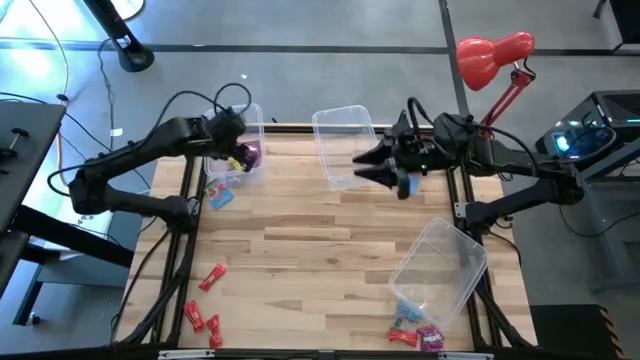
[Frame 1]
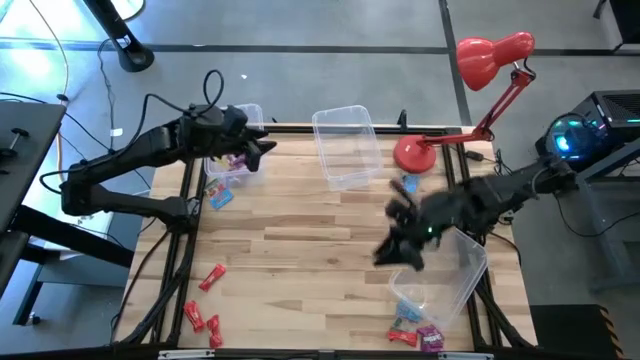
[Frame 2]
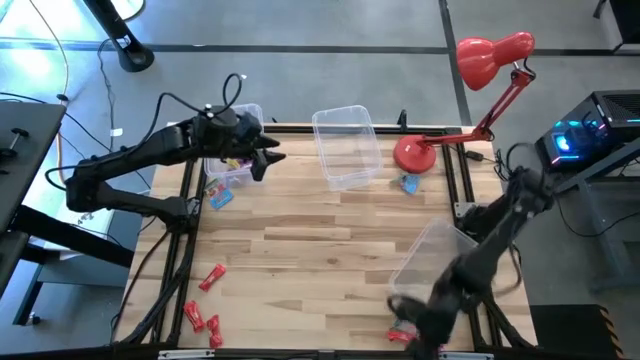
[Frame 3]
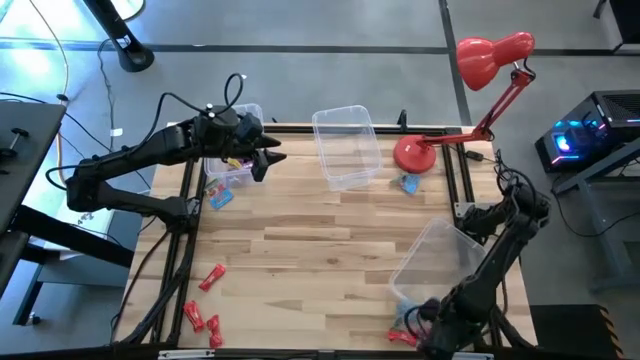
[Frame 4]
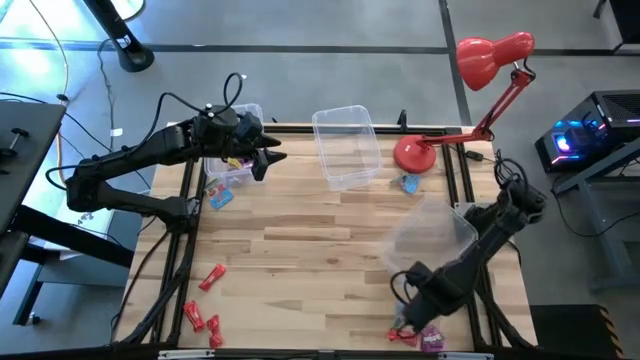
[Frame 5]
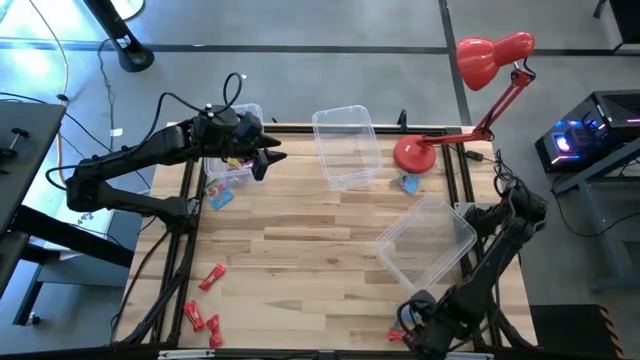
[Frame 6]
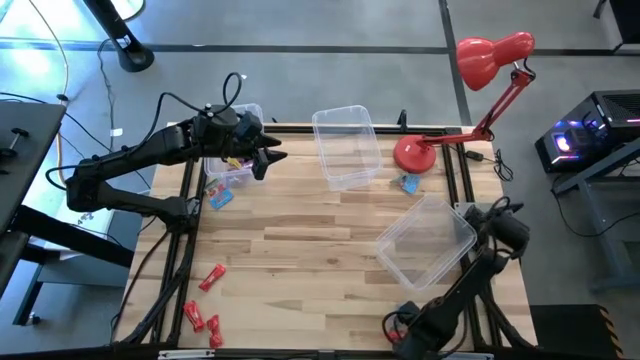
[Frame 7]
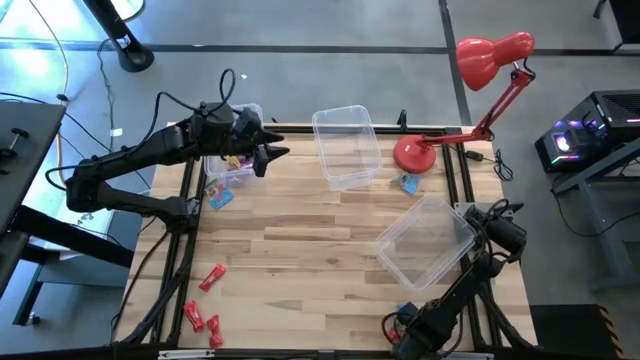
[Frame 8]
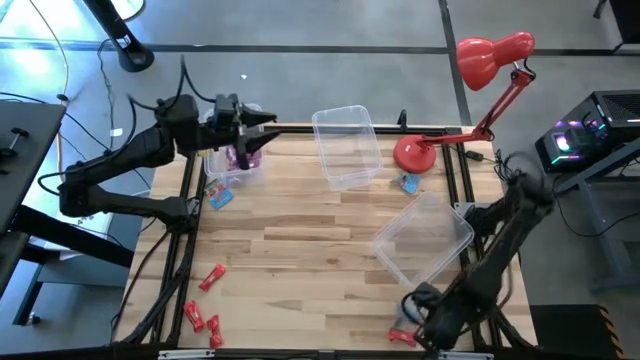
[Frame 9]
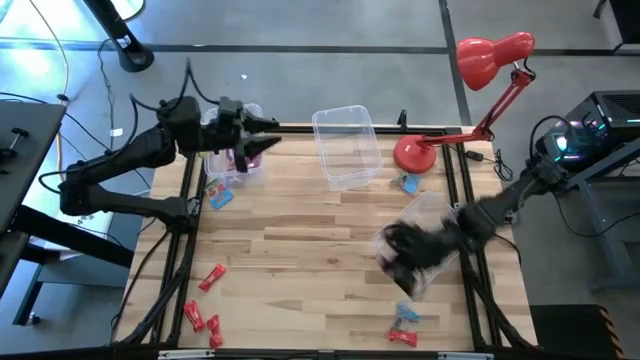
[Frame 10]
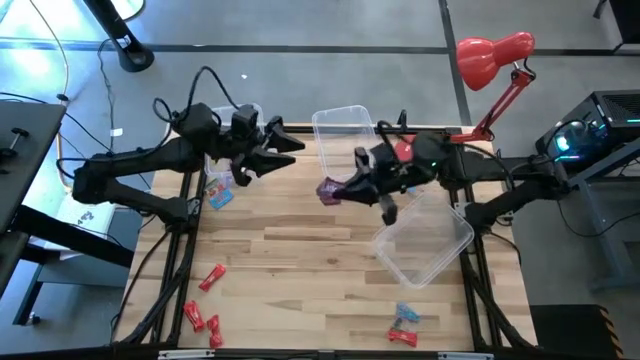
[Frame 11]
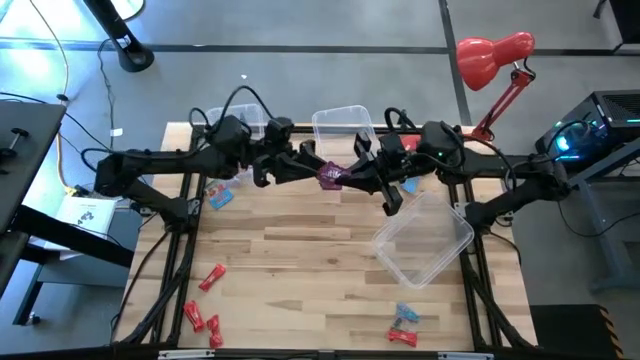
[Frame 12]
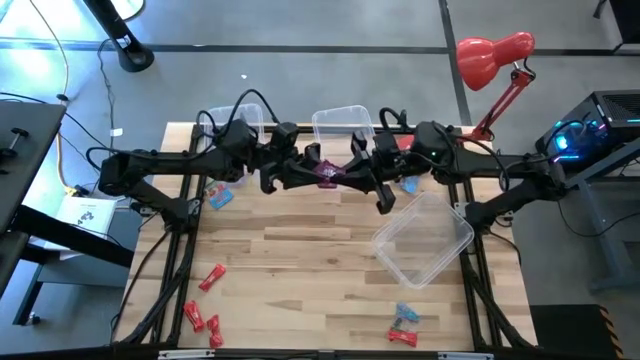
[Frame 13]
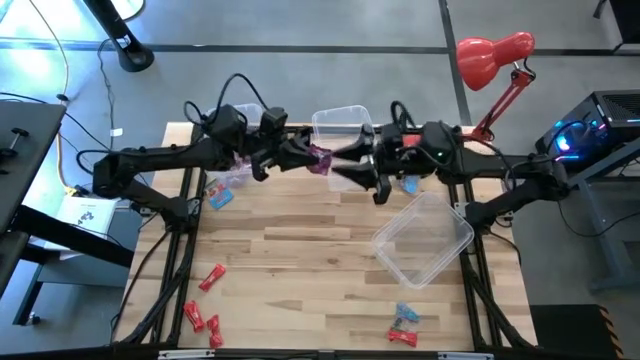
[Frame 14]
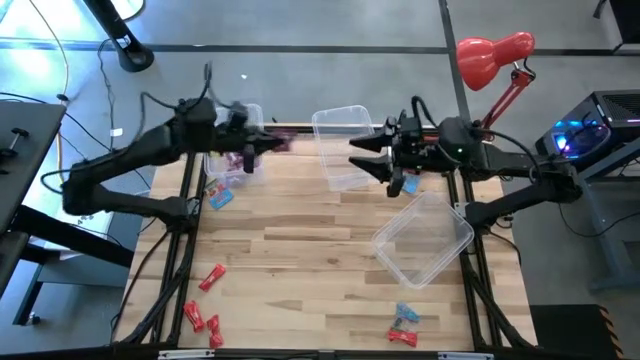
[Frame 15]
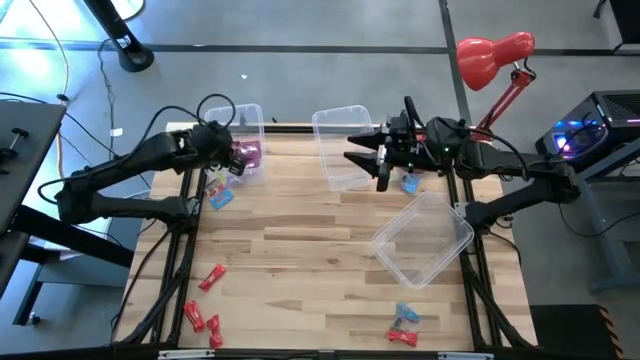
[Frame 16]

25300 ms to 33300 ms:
Task: Sort candy
Put the purple candy into the top left transparent bin

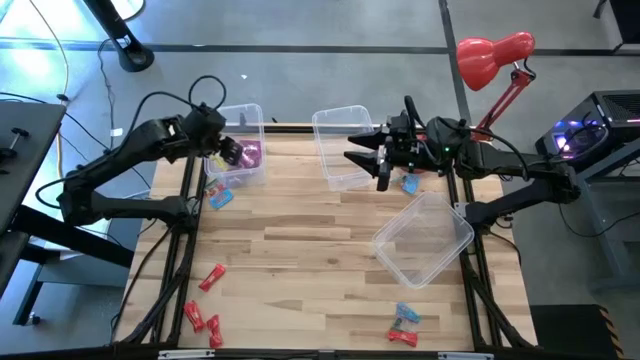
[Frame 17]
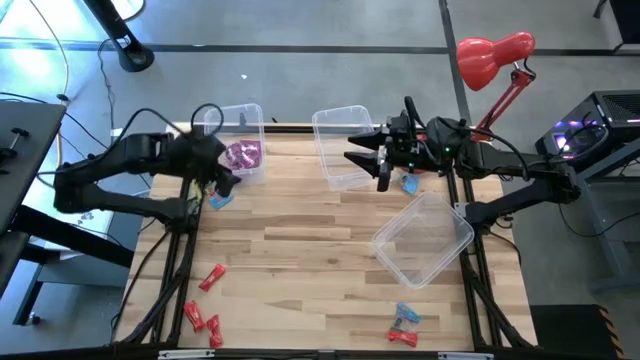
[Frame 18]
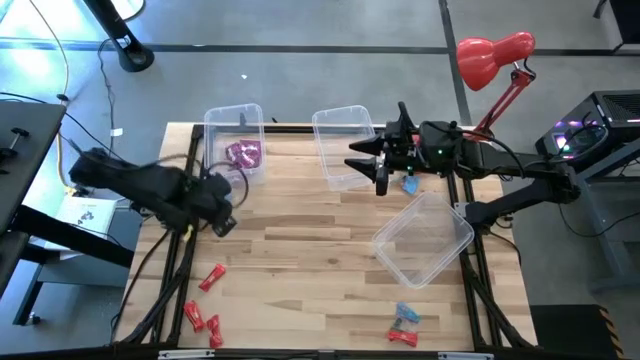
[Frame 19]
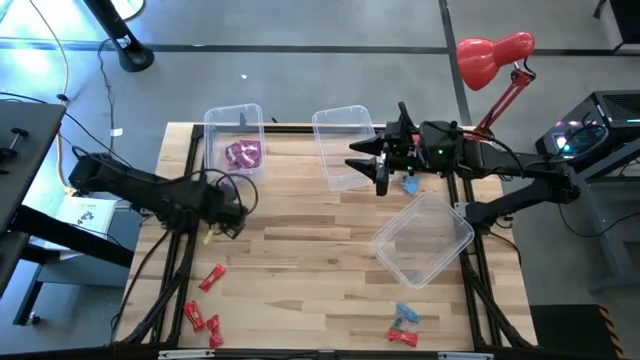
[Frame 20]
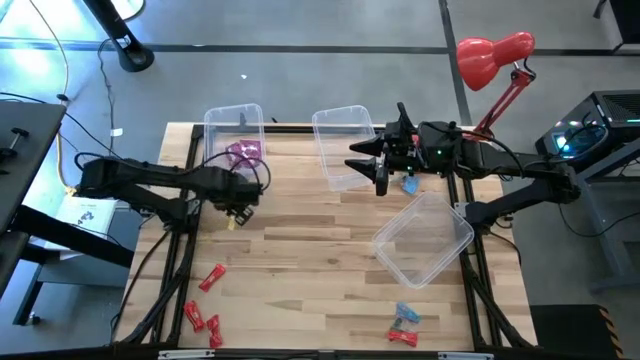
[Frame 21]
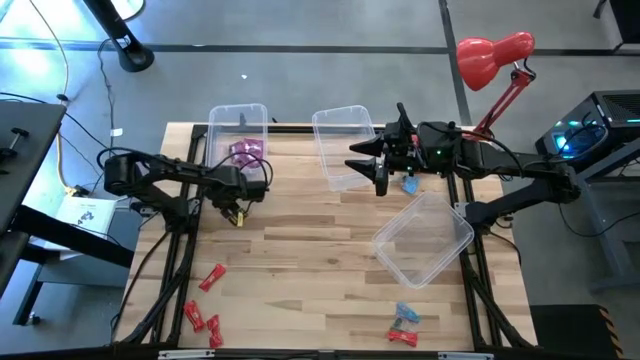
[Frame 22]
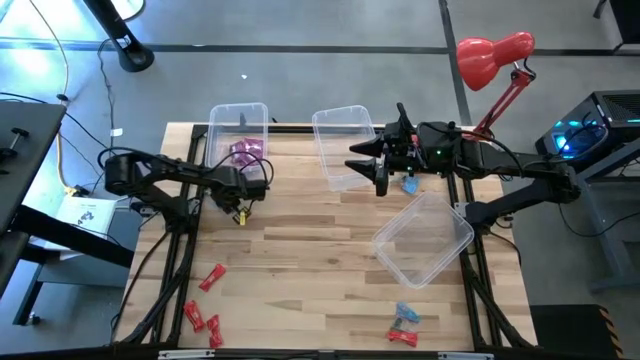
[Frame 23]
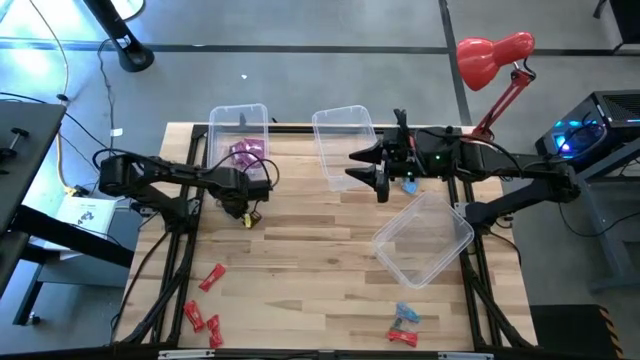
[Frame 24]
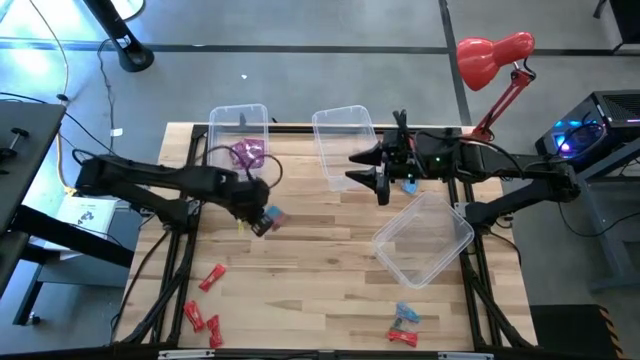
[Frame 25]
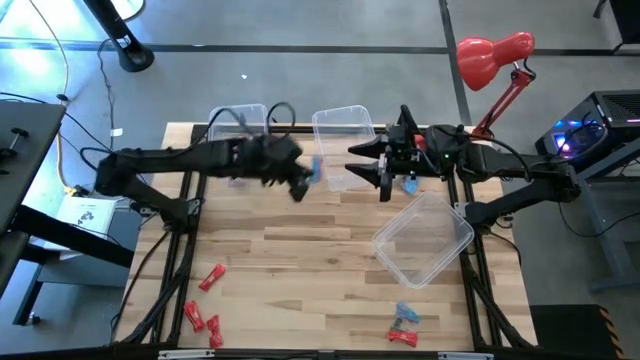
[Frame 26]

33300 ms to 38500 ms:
Put the blue candy into the top right transparent bin

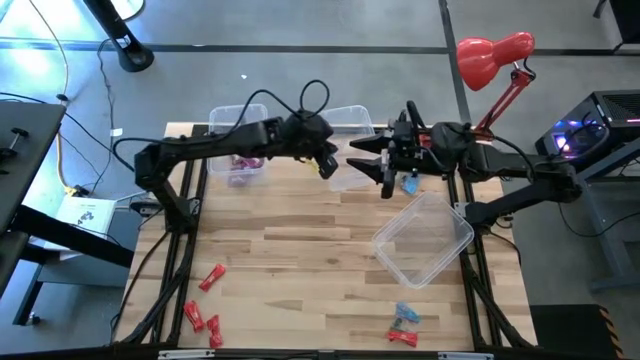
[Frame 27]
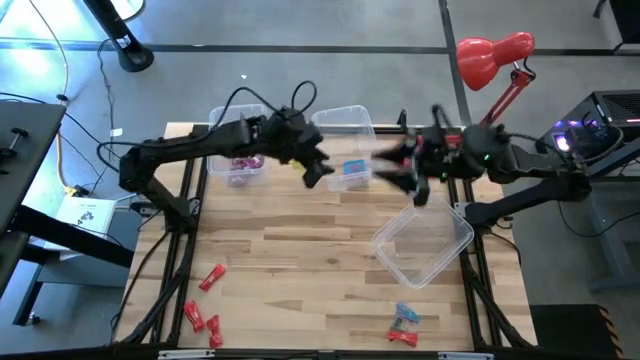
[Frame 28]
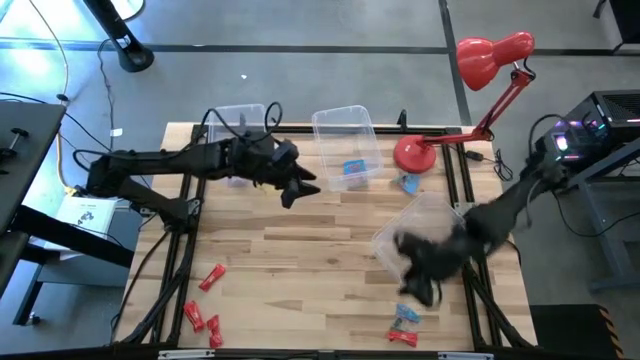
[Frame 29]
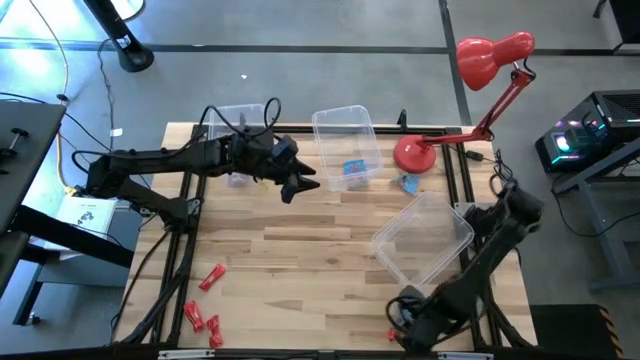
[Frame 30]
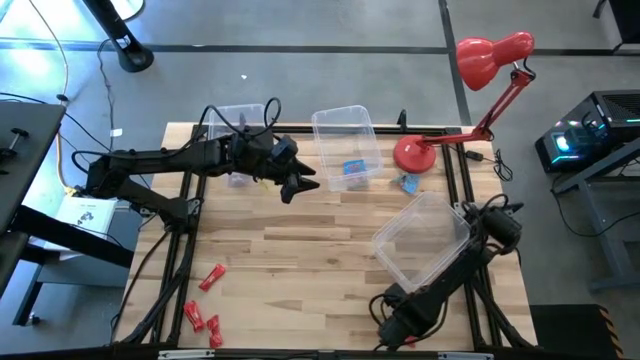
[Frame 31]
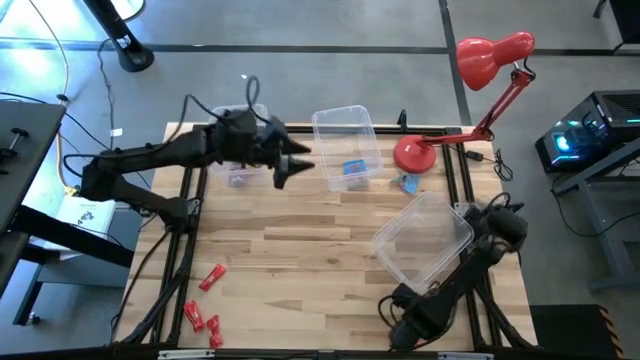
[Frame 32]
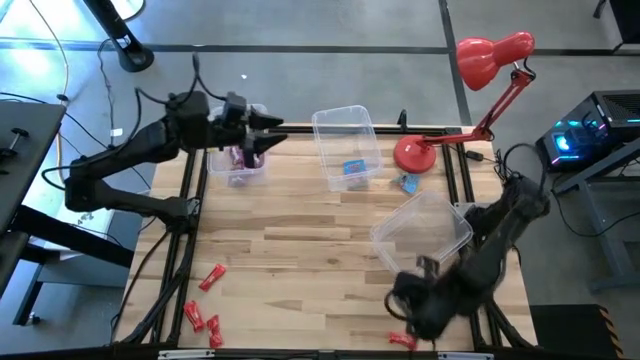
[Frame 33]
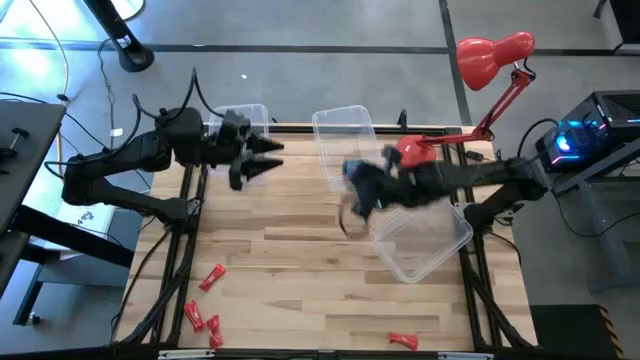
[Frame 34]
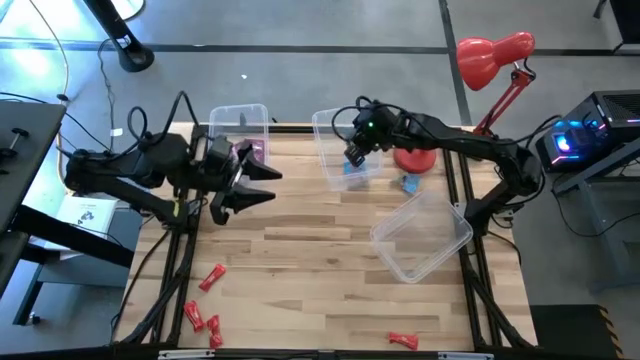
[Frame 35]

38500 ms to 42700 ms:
Put the blue candy into the top right transparent bin

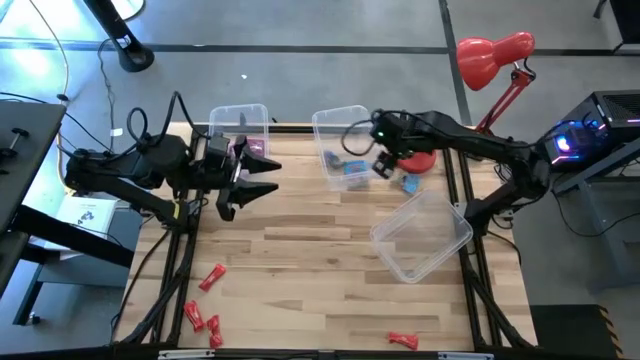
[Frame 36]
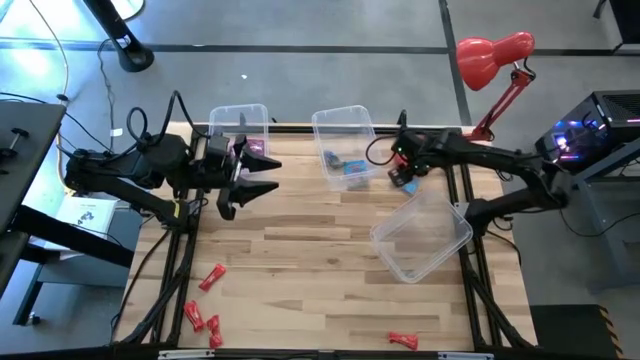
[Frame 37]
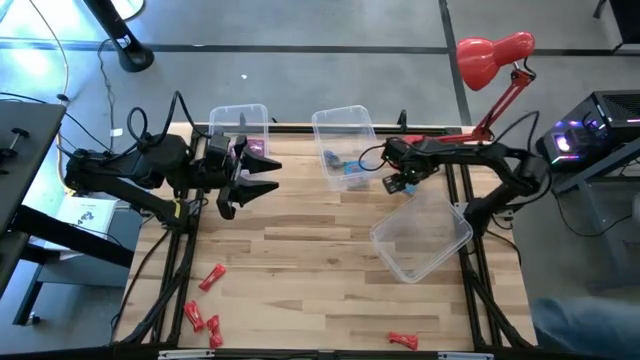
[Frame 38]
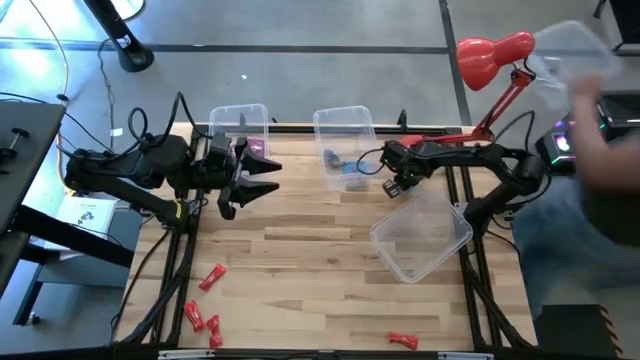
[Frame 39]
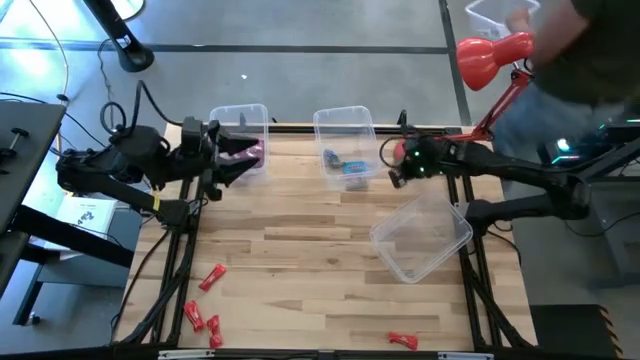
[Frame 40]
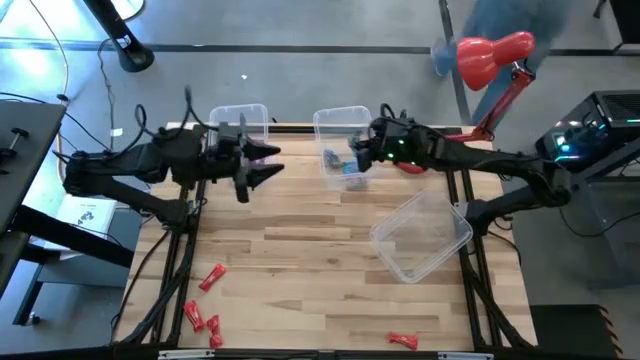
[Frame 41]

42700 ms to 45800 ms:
Put the candy into the top right transparent bin

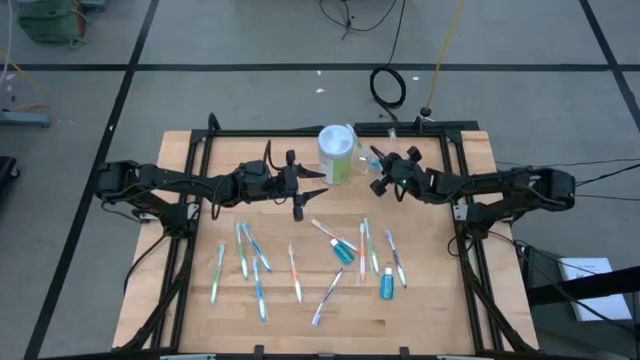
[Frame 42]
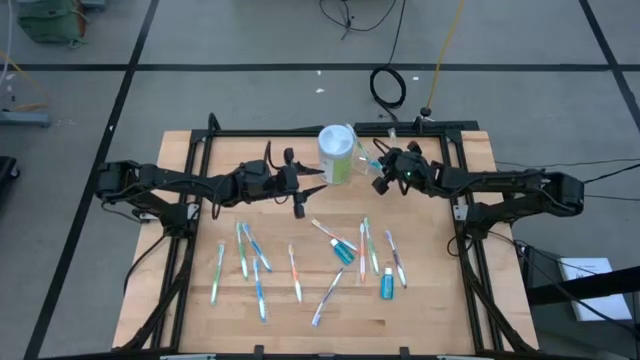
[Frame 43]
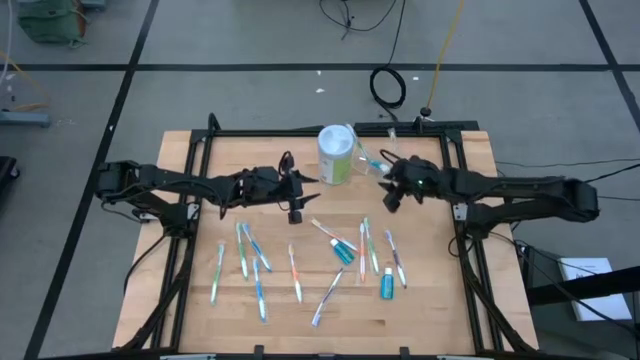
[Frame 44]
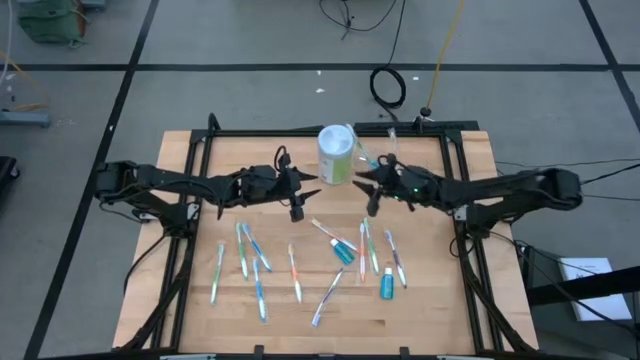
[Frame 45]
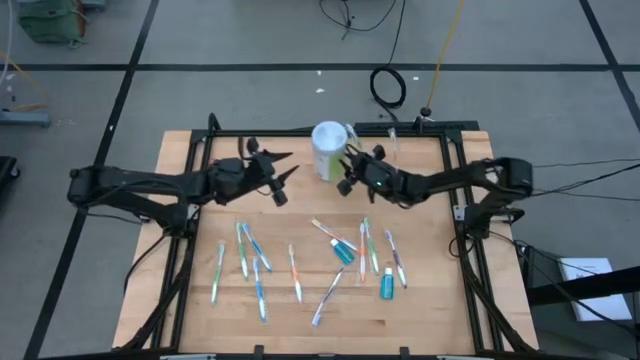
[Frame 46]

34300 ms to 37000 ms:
Task: Pick & Place toothbrushing station
Adjust the green bottle
